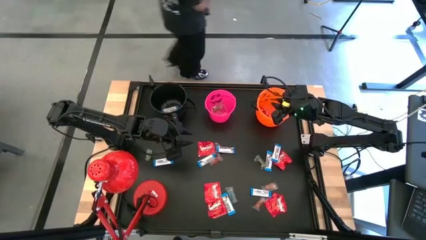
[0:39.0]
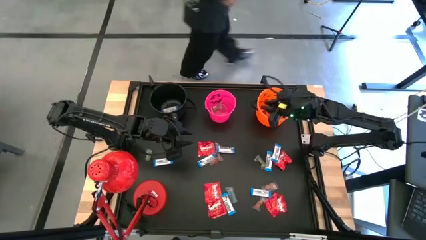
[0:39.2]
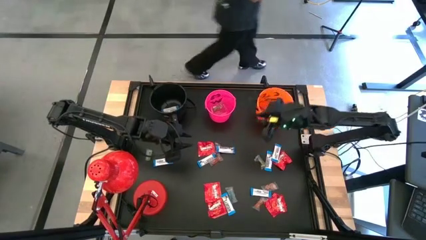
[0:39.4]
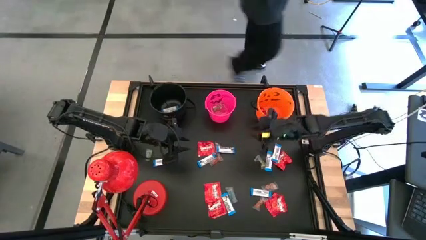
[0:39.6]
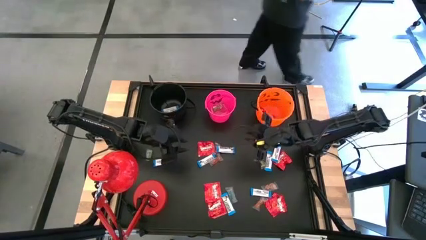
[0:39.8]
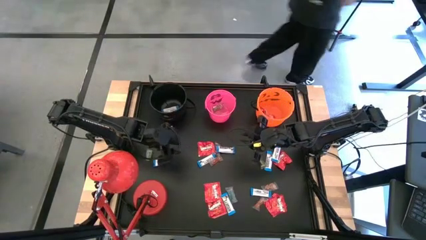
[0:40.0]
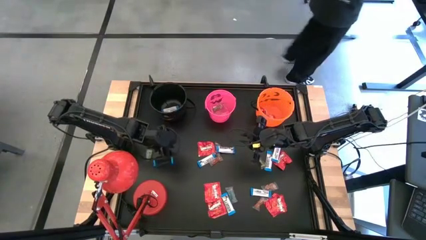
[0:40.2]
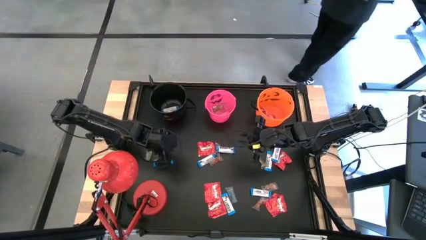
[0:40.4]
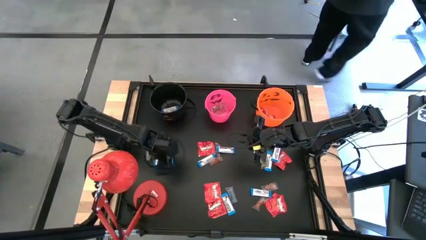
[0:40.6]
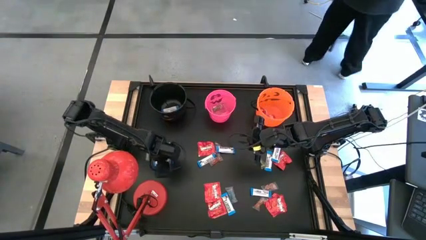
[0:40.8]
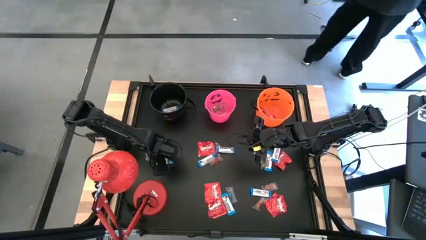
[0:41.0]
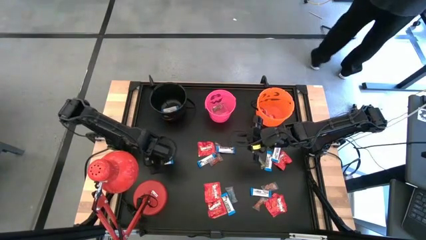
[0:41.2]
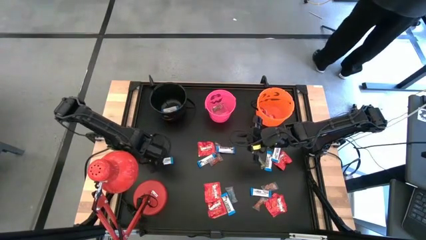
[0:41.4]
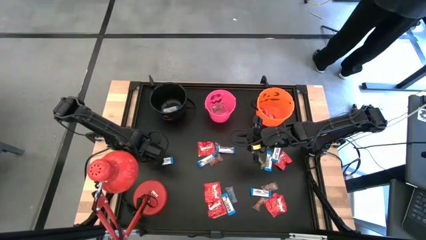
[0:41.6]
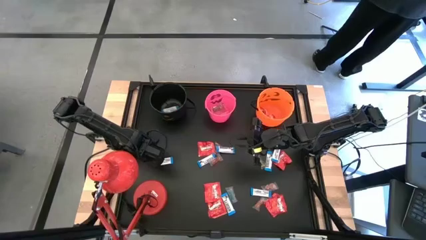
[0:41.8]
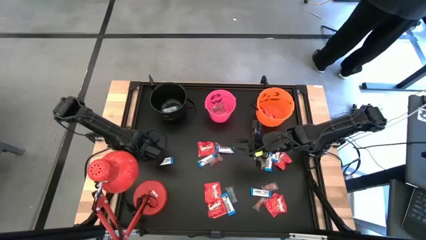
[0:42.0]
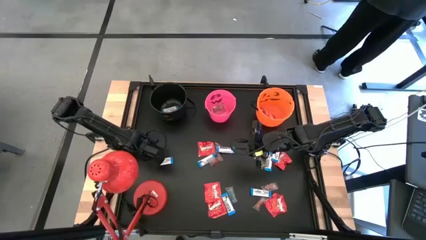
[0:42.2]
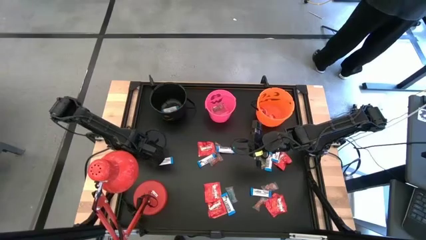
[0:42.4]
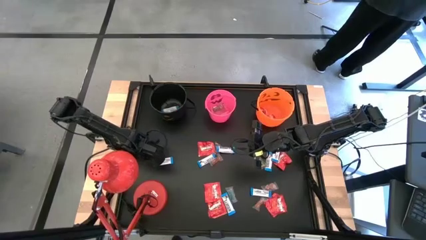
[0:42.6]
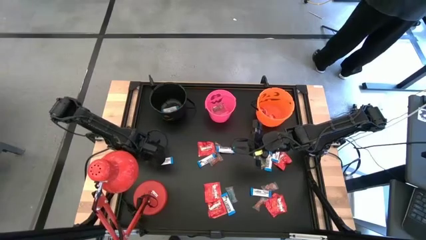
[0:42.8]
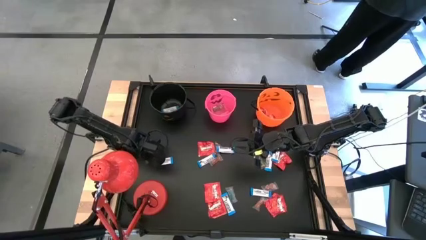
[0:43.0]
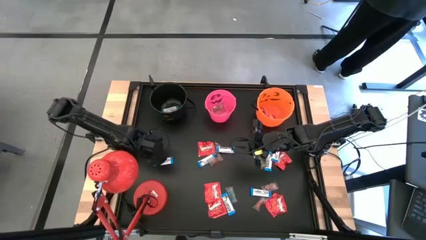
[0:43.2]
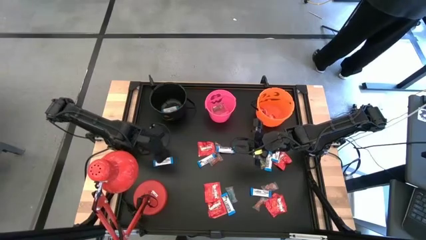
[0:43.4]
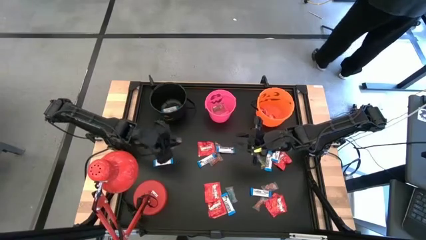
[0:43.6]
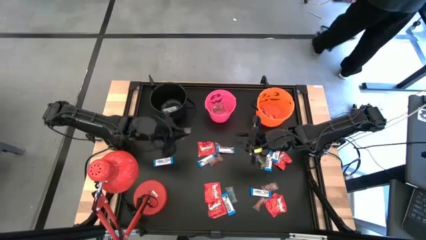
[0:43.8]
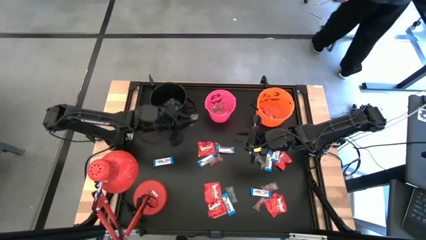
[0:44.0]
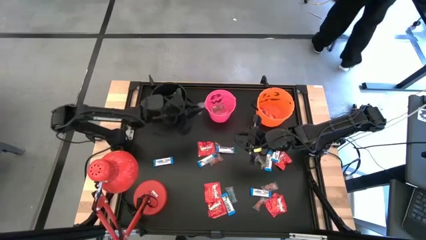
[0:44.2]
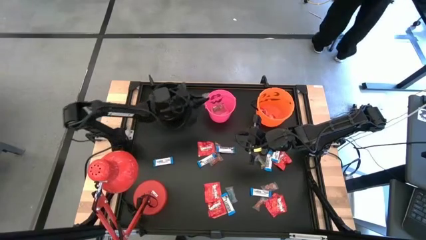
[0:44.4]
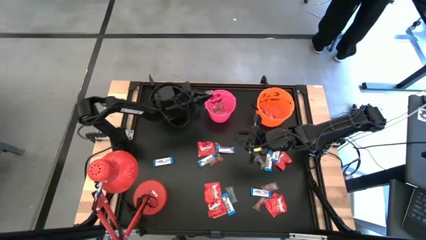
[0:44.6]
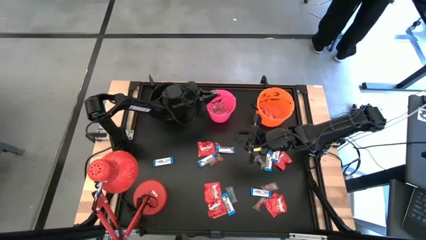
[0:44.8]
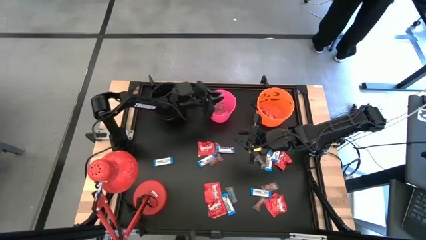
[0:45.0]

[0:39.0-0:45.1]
Task: Organize candy in baskets
Put the transparent candy into the pink bucket

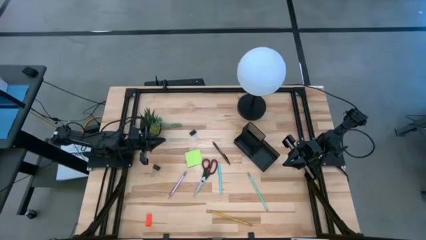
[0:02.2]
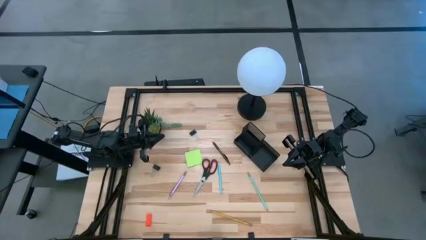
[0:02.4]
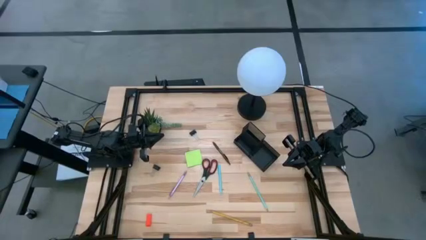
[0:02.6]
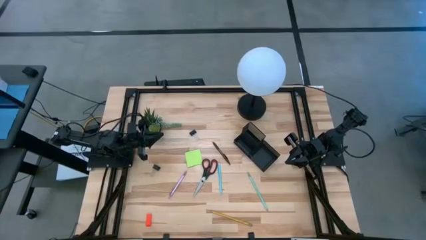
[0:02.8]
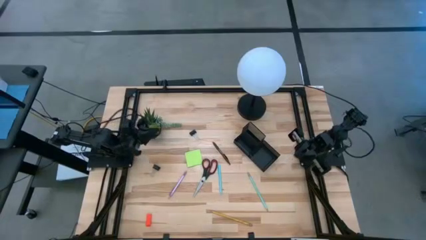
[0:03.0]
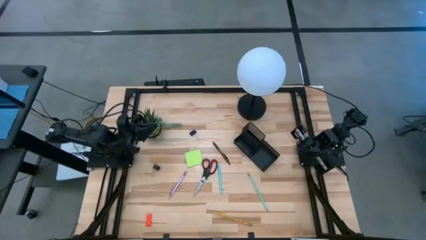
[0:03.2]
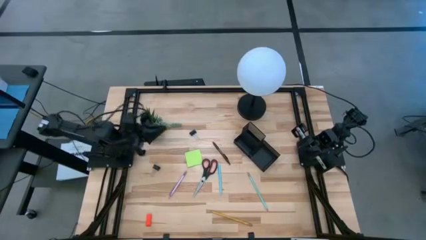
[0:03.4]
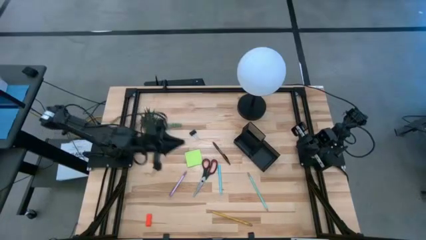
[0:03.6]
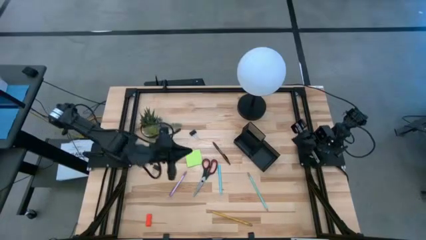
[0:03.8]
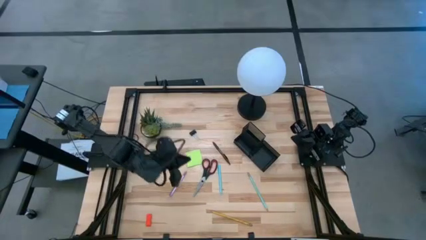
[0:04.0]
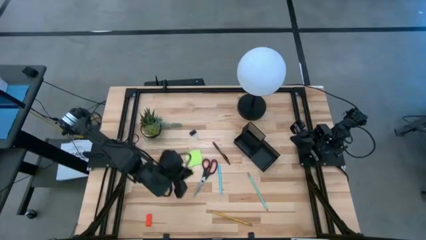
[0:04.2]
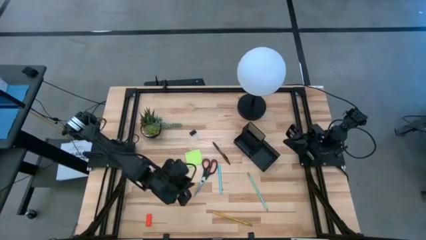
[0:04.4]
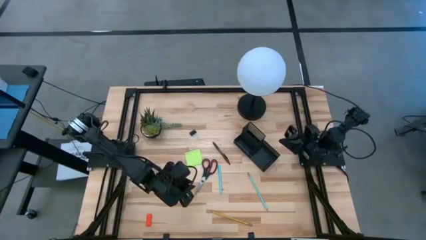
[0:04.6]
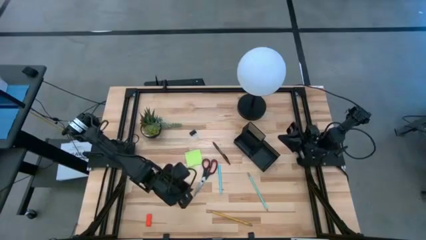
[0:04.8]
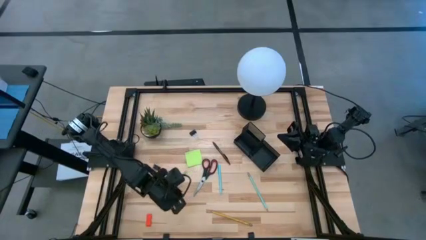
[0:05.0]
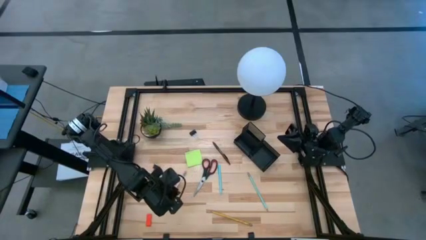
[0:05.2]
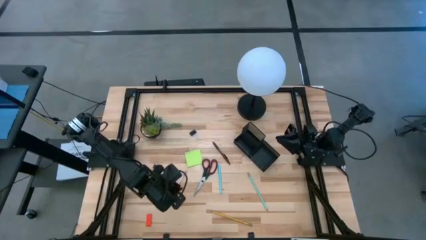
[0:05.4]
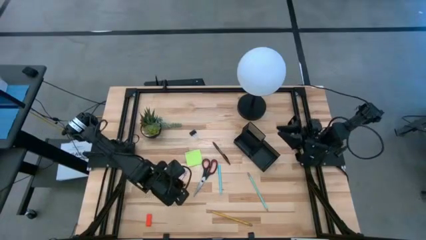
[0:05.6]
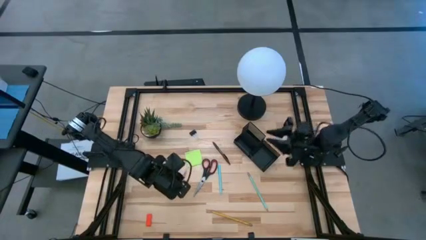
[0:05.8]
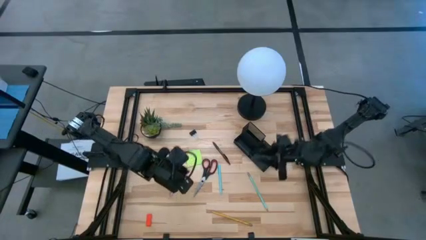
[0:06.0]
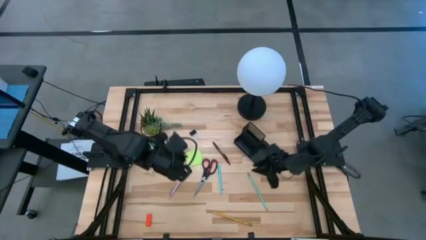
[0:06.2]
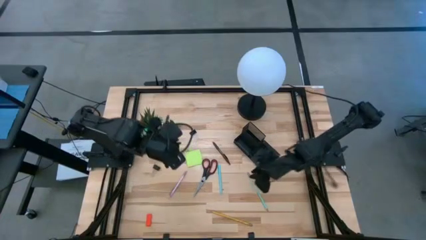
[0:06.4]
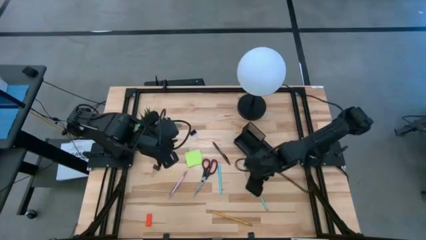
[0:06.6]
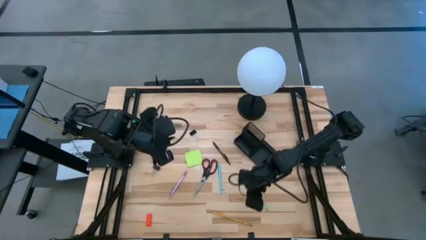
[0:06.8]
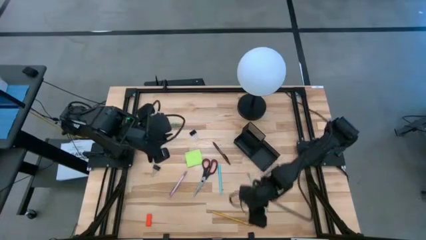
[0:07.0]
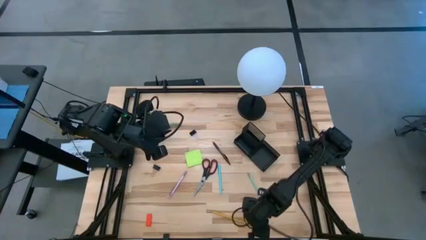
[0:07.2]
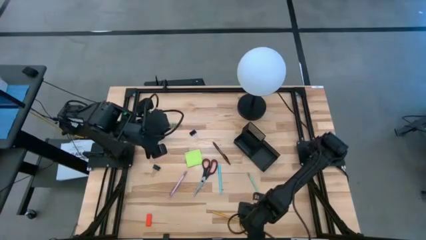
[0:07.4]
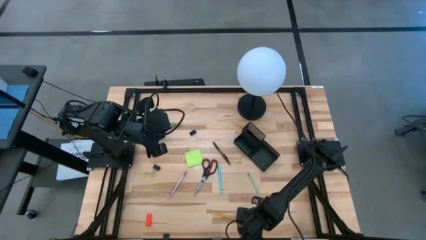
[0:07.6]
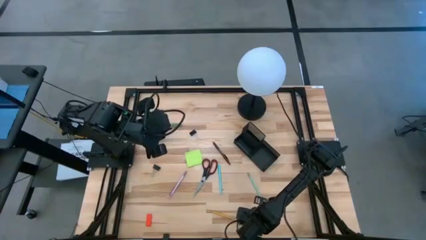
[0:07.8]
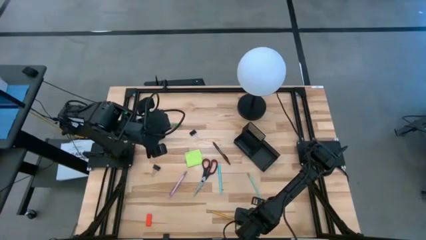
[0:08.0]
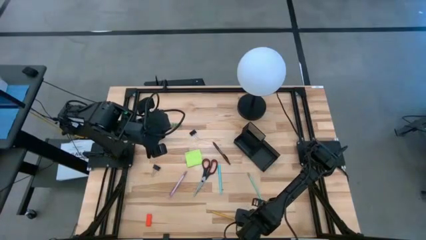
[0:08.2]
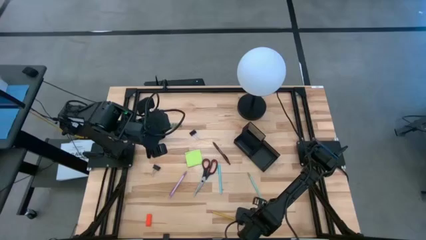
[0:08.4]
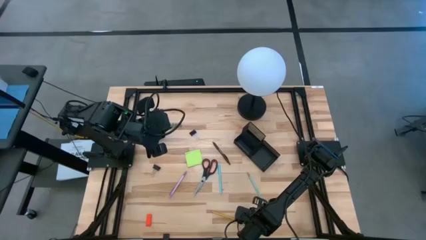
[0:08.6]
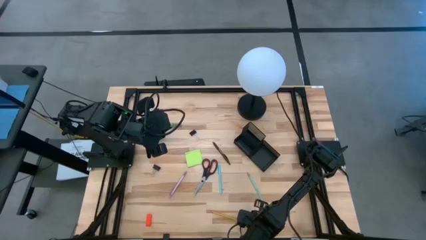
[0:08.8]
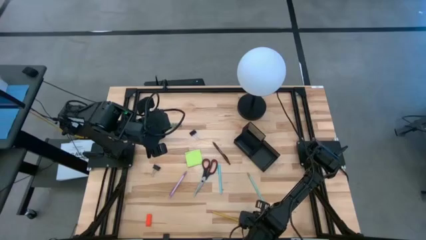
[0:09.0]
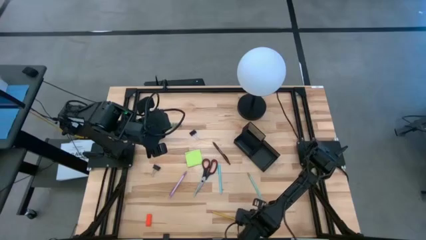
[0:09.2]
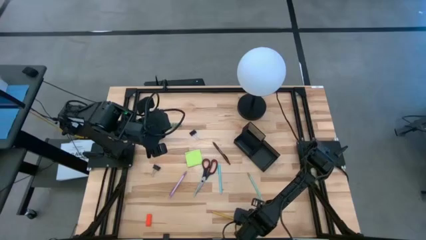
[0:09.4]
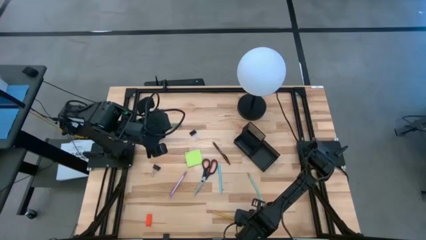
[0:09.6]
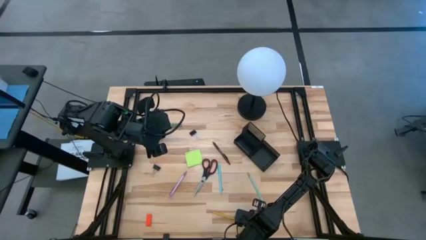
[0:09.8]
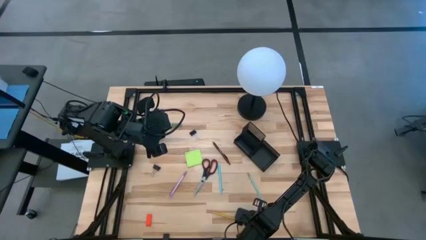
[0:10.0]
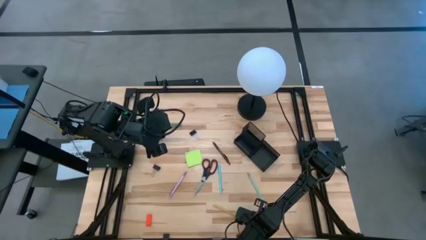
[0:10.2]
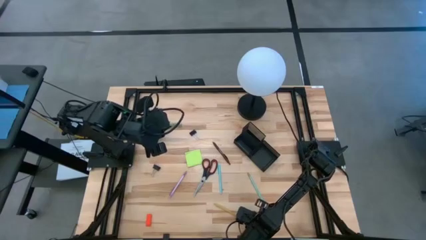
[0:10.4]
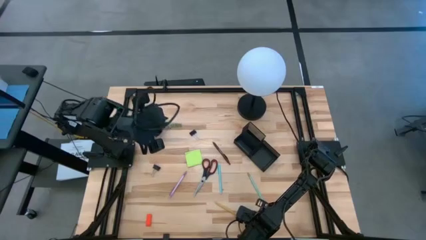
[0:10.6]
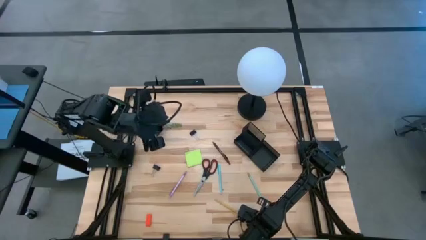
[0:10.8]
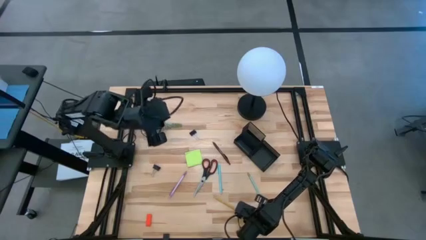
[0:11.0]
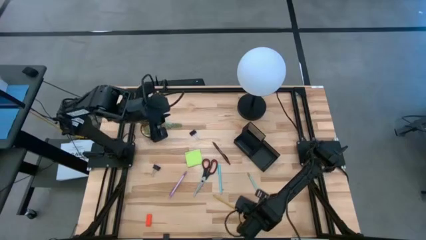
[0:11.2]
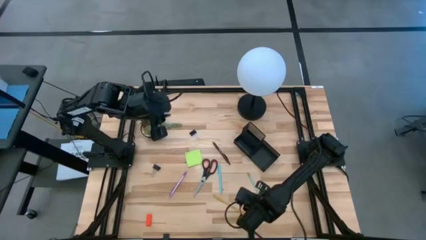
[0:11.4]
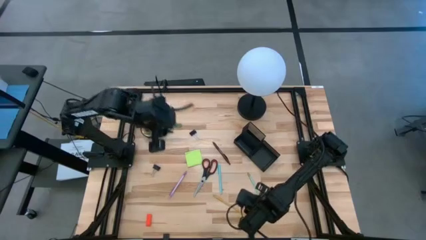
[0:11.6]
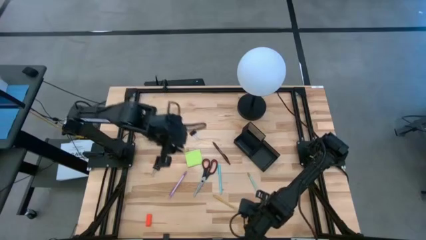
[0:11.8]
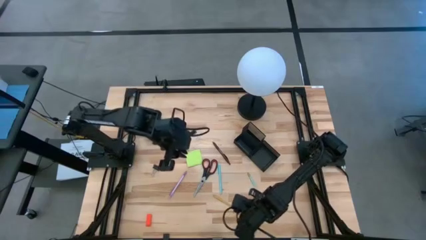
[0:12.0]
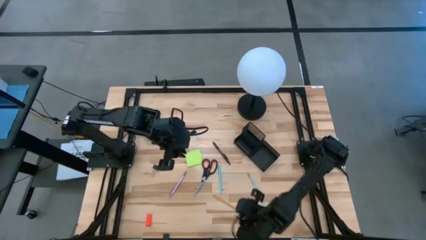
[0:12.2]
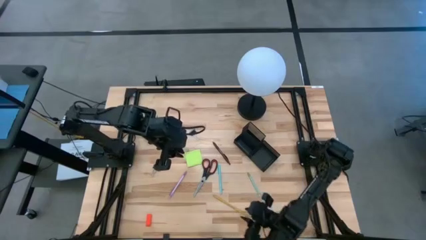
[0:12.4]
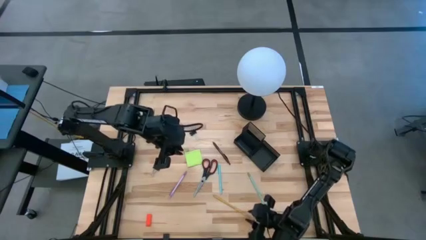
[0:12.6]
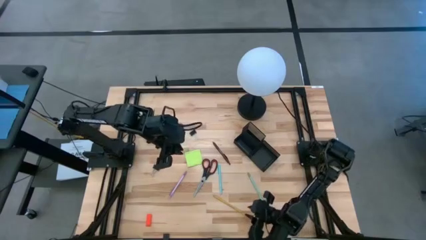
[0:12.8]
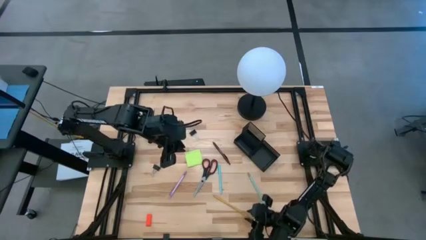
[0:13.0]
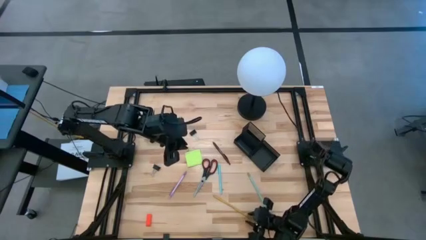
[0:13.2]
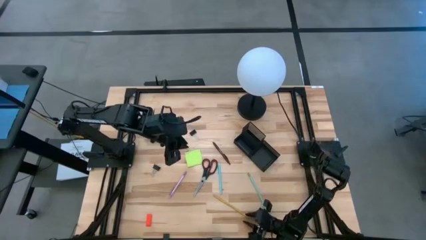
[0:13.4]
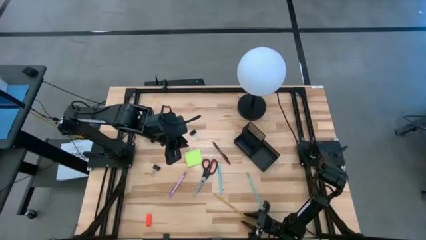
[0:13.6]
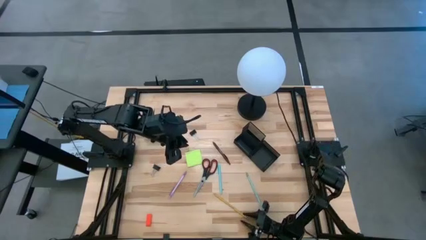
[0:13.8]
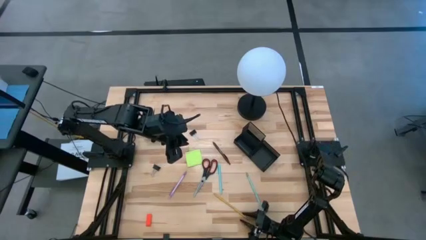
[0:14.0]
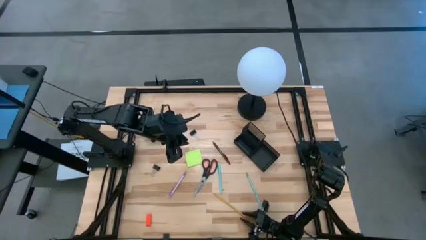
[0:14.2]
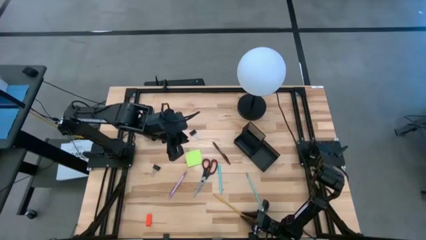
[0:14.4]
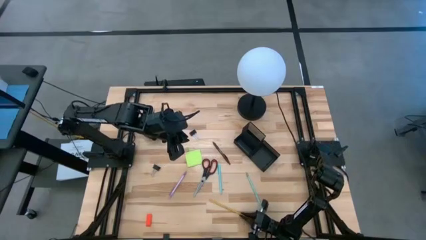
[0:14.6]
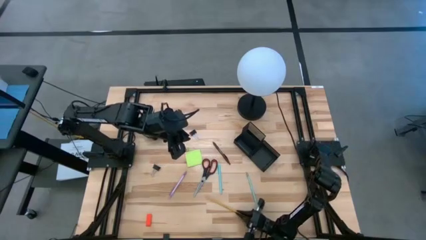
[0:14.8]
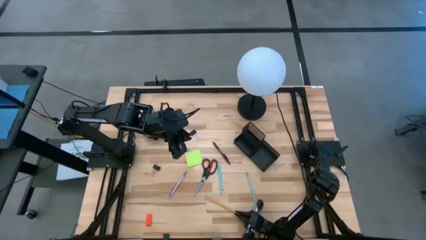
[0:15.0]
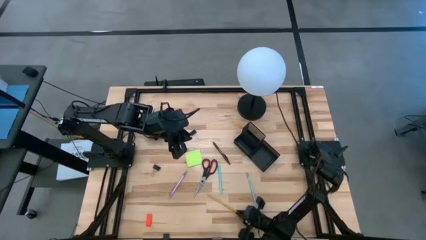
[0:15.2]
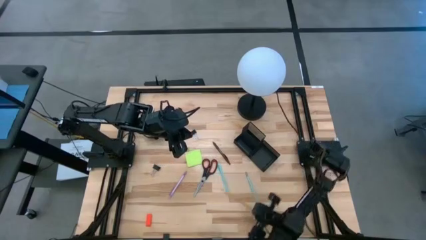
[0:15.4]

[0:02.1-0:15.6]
Task: Pick and place office supplies into organizer
Put the yellow pencil into the black desk organizer
